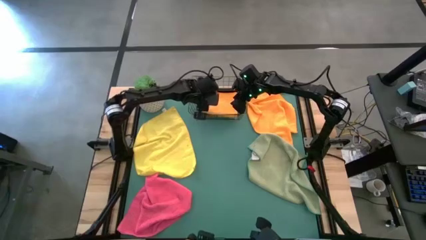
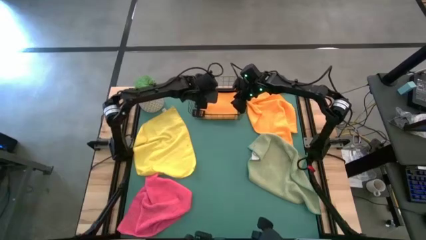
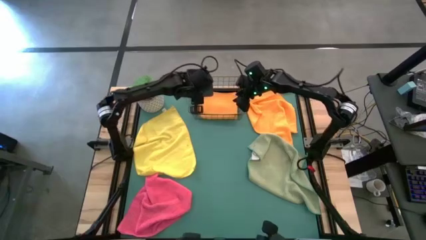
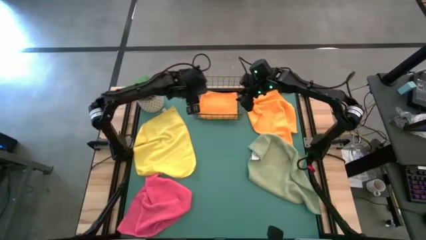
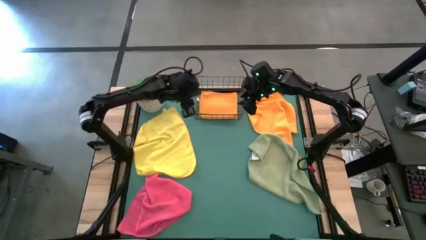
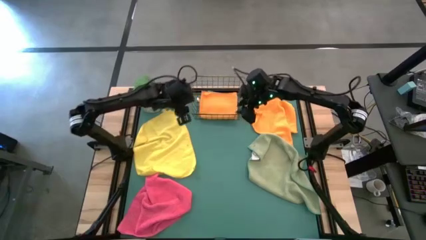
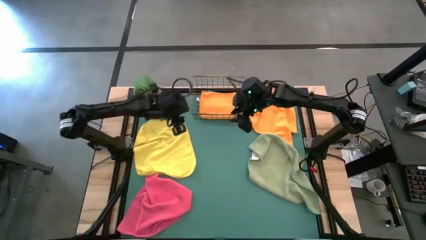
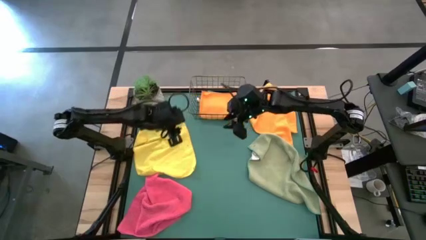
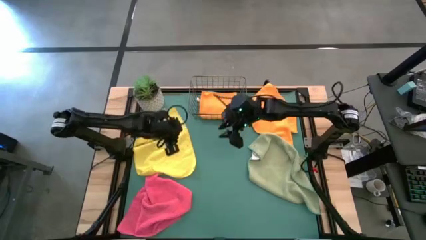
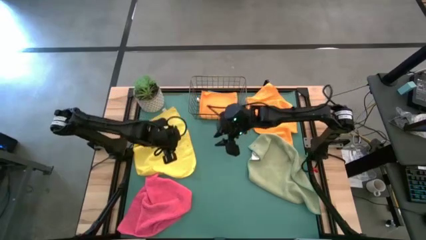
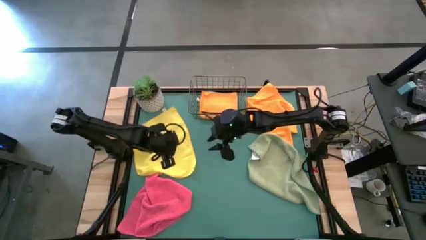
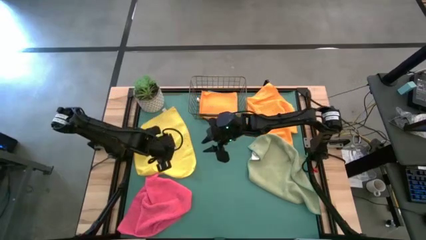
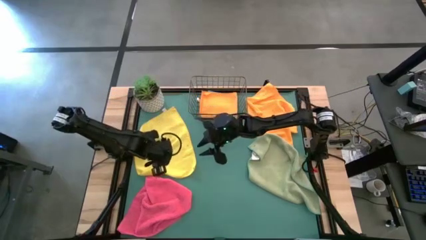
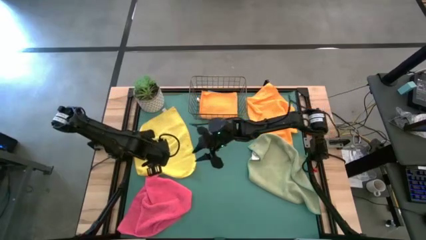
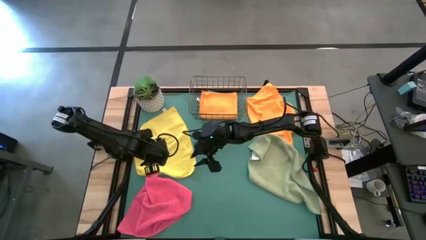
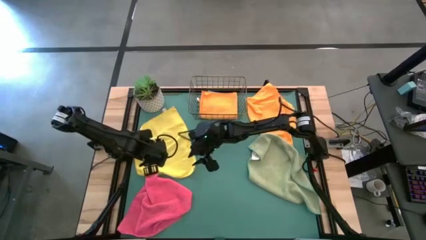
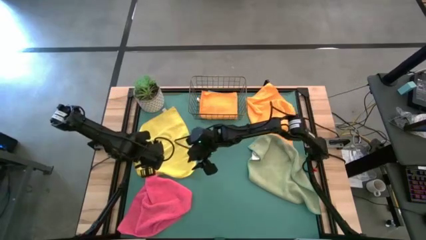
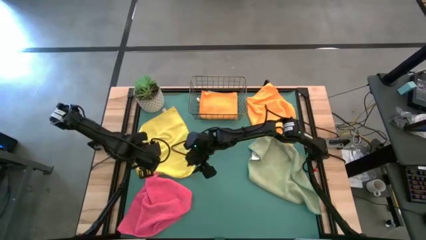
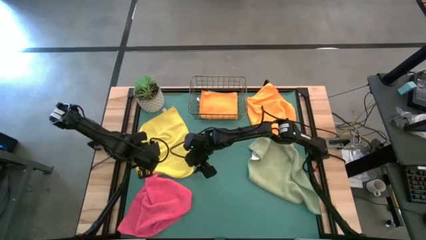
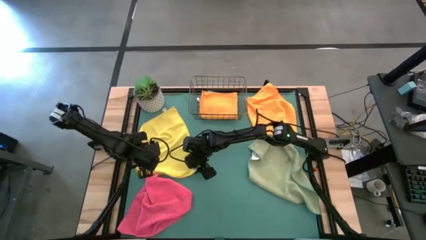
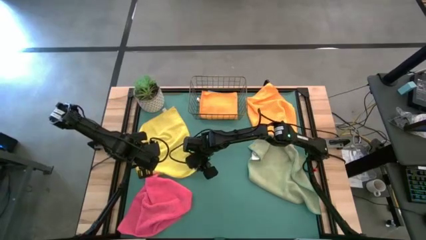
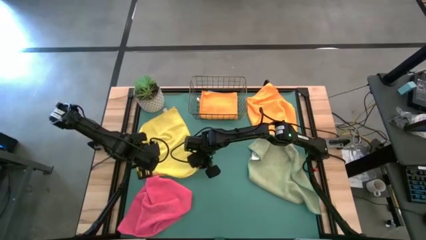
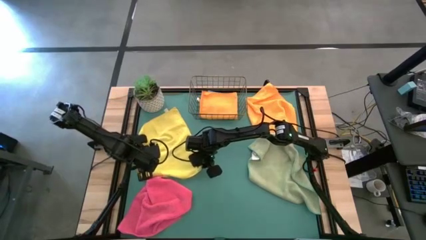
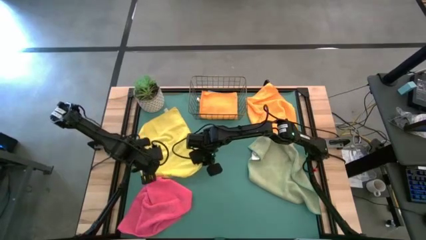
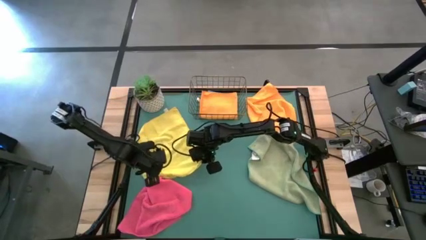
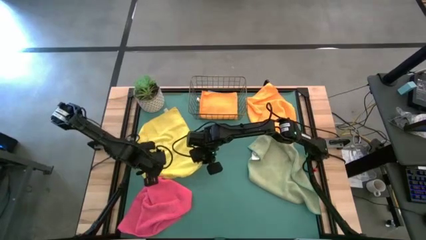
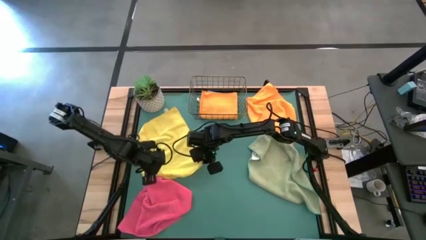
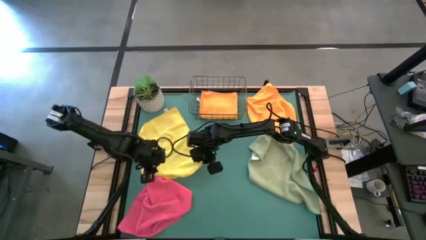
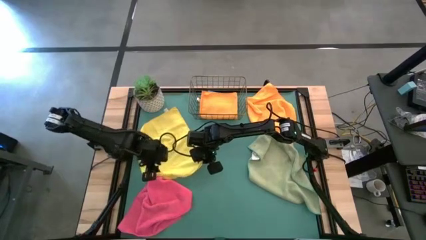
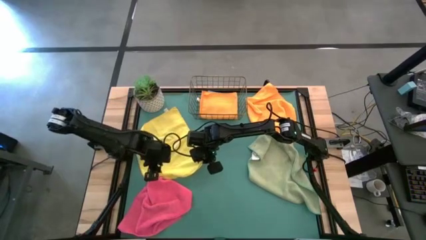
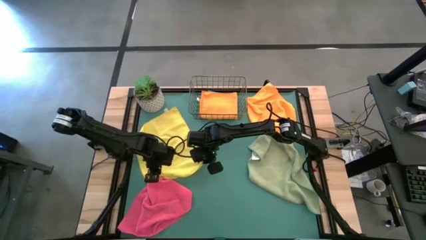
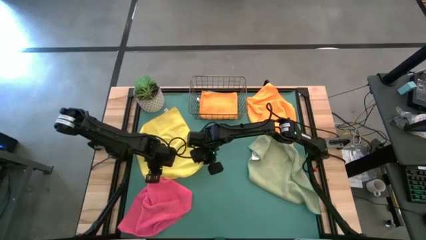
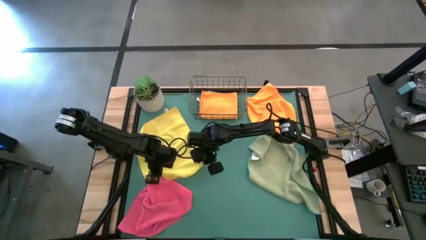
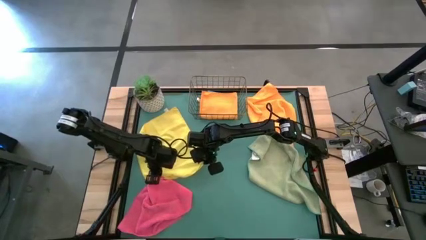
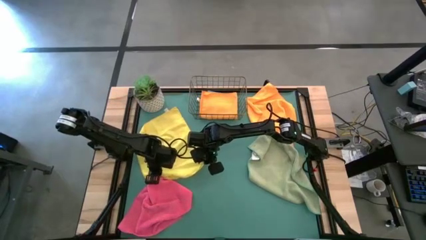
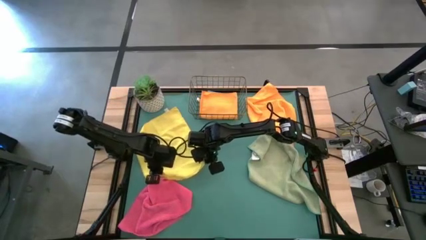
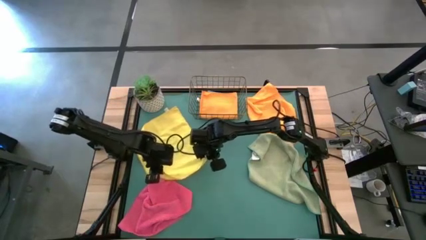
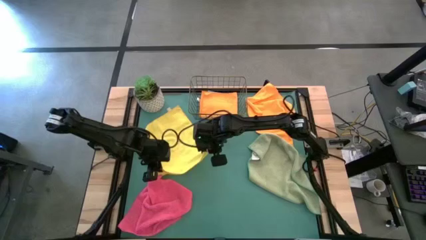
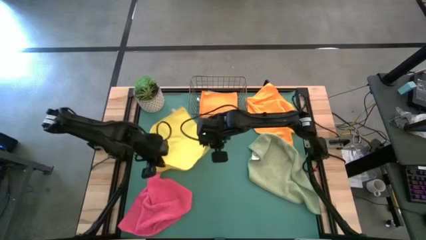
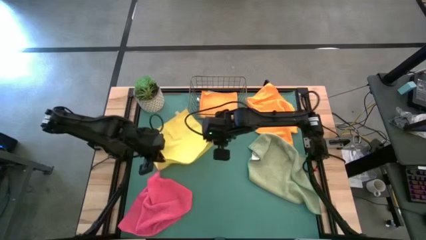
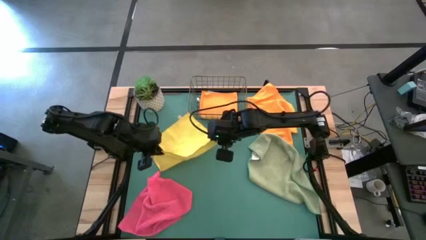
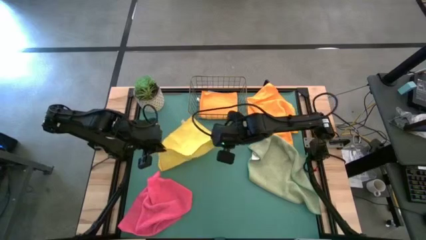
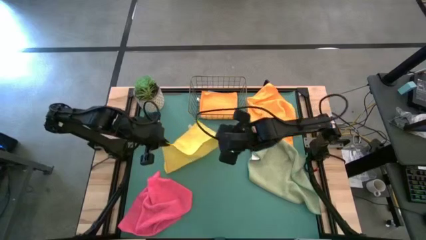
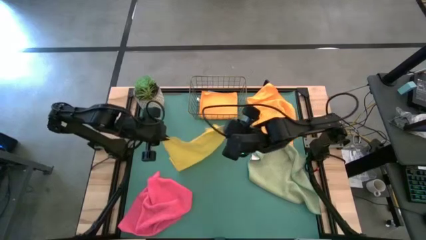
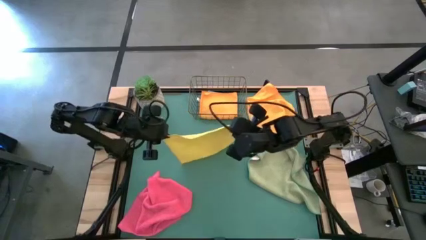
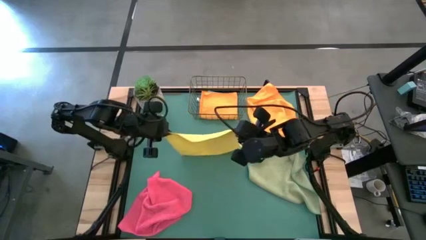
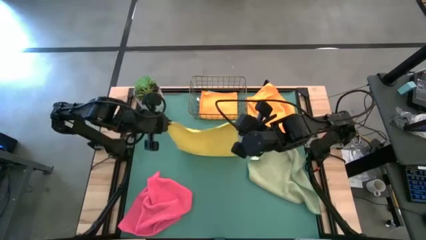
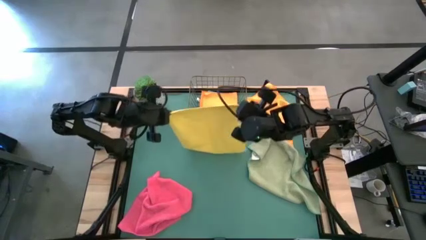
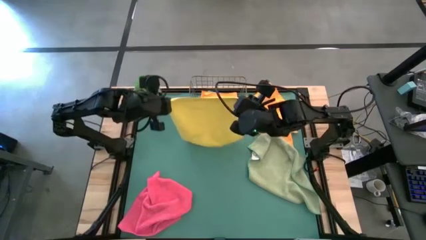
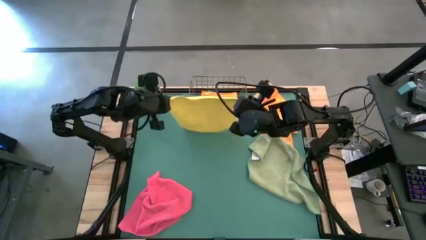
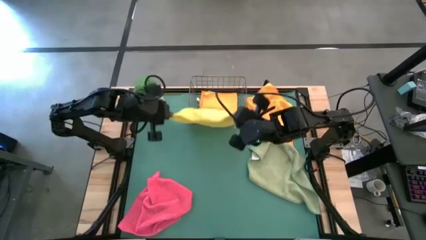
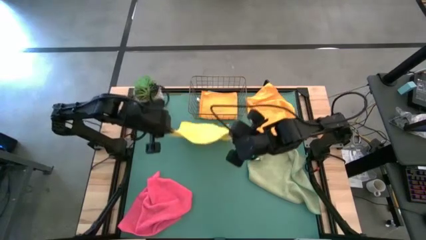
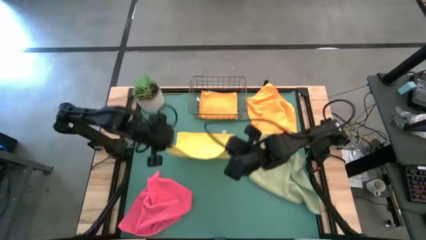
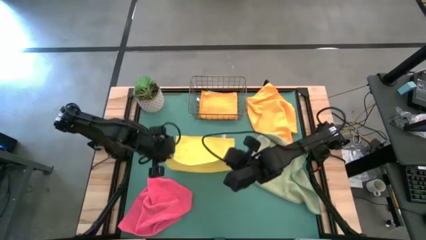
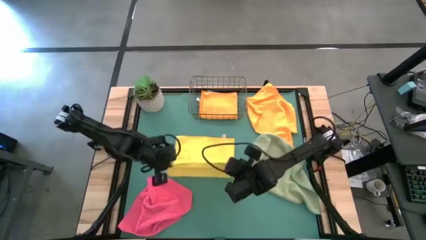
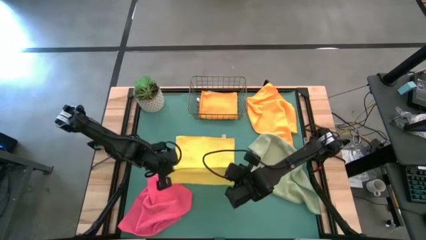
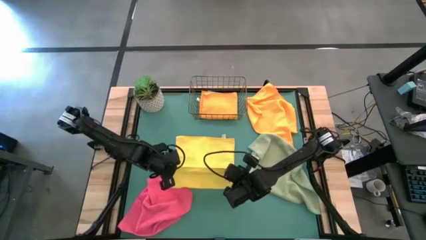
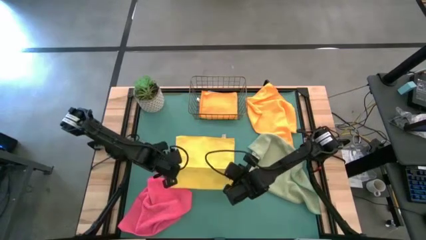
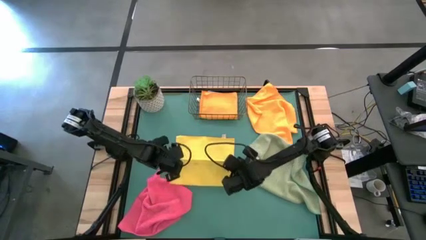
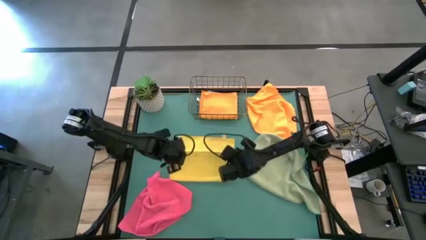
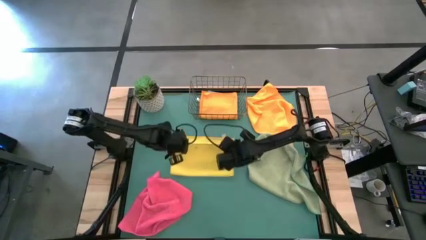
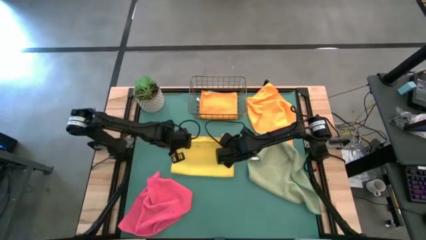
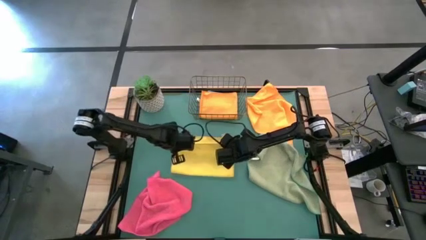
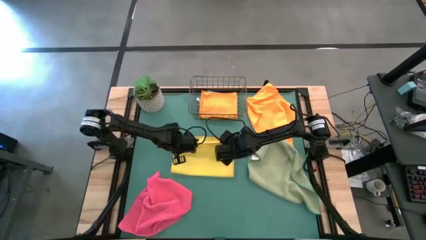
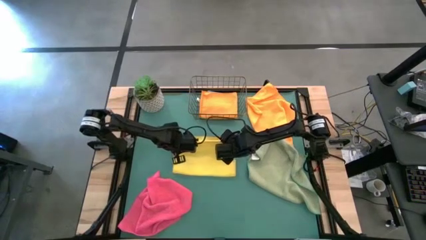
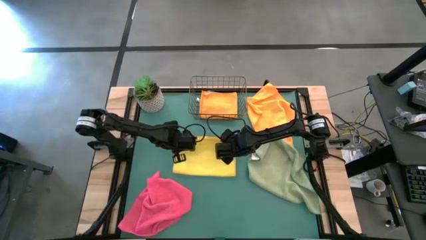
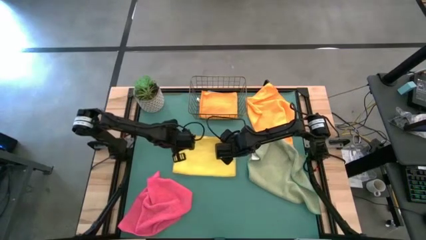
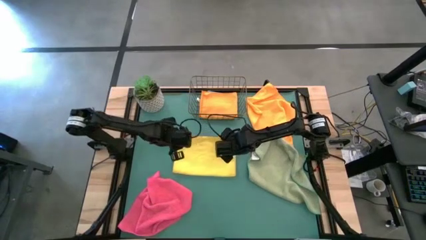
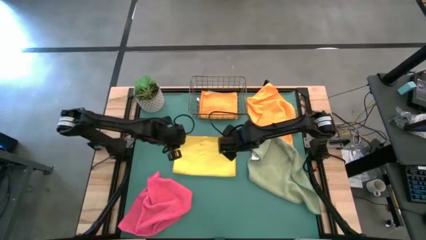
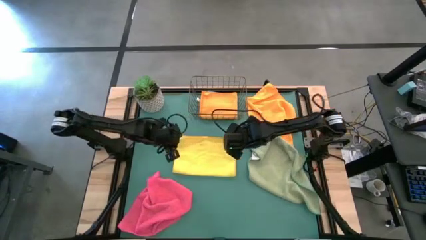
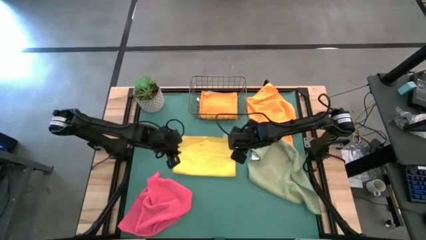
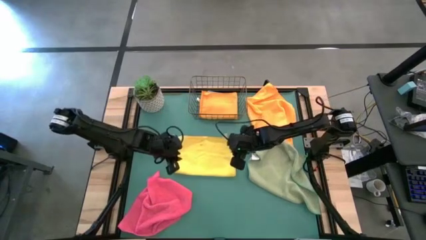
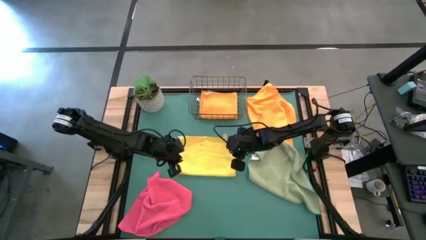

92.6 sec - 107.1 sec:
Task: Fold microfiber towels
Fold the yellow microfiber cloth

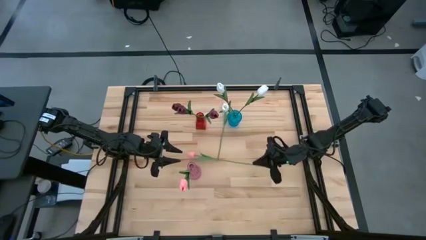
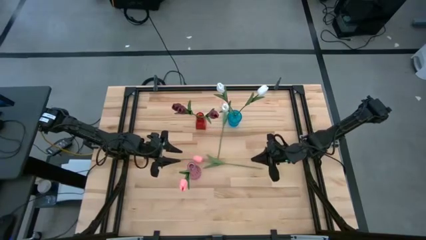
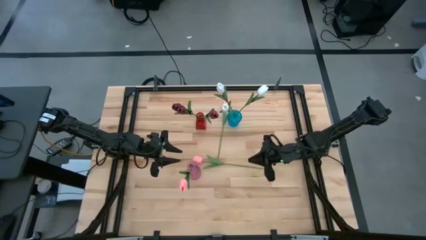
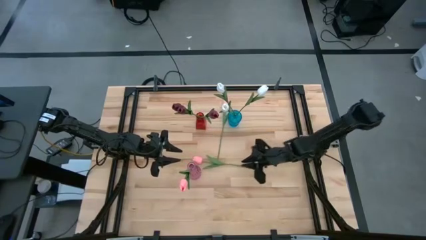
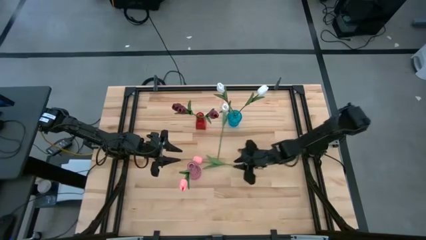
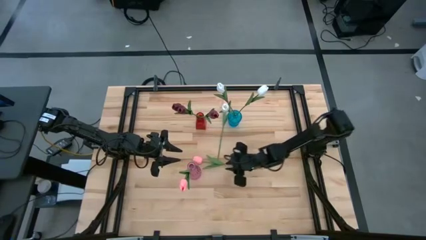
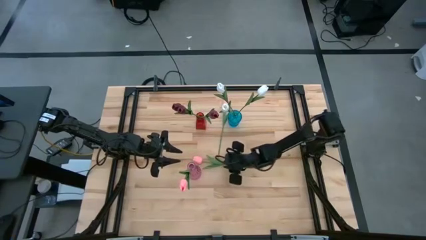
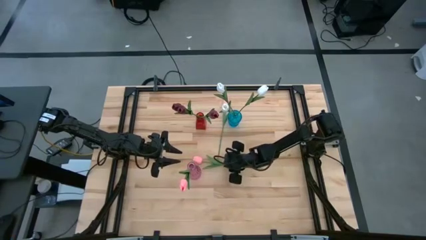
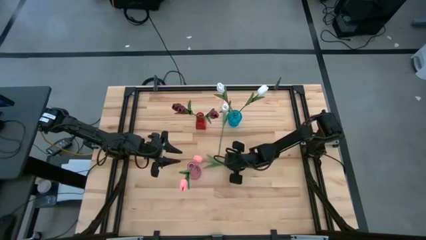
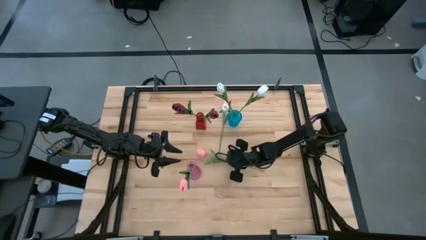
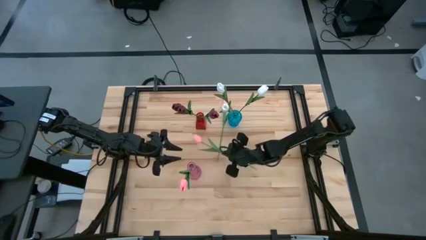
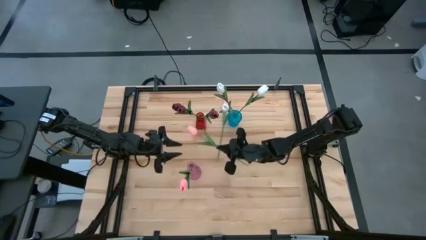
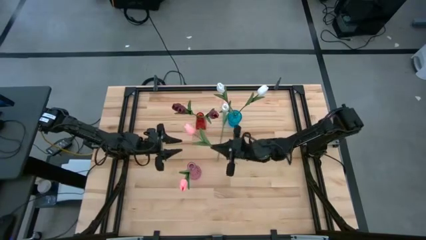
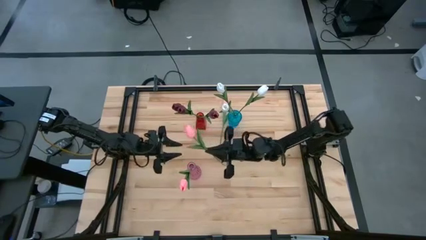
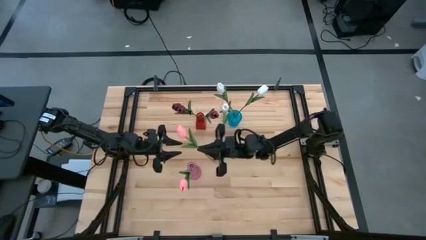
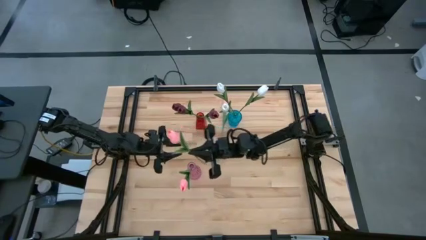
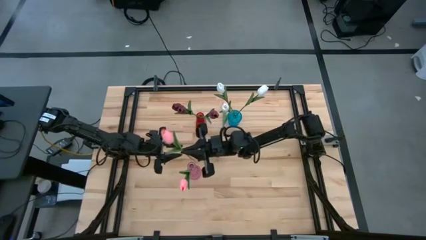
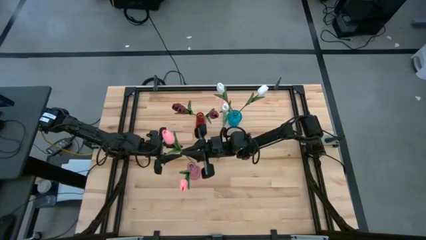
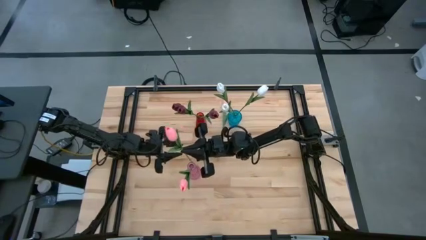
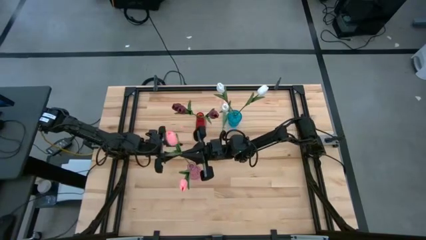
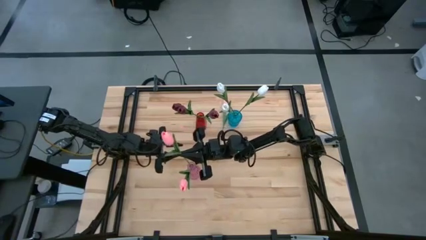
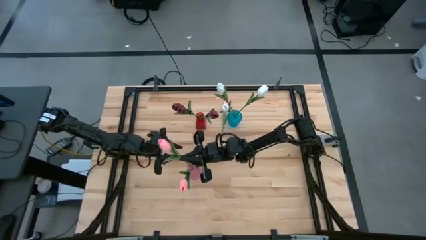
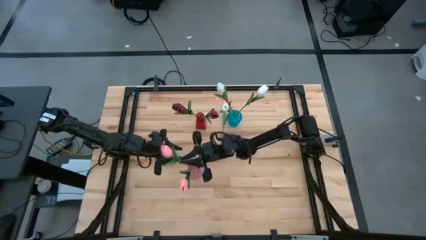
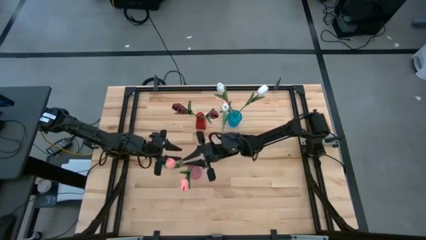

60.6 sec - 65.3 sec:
Task: Sort flowers into vase by color
Put the left pink flower into the pink vase
